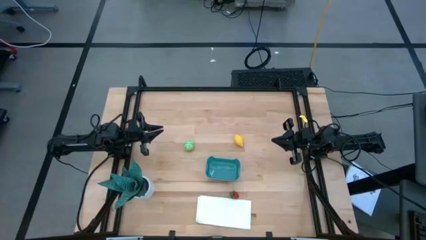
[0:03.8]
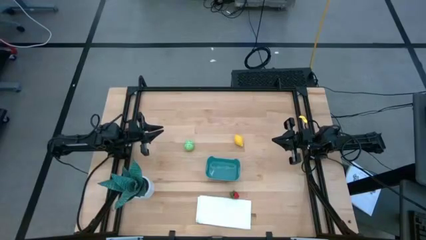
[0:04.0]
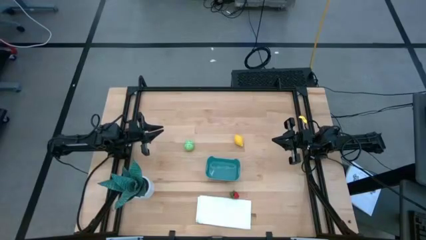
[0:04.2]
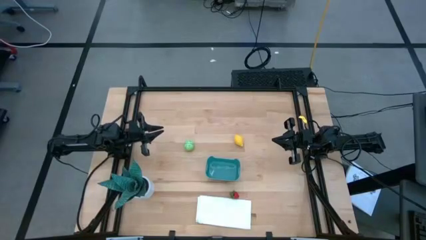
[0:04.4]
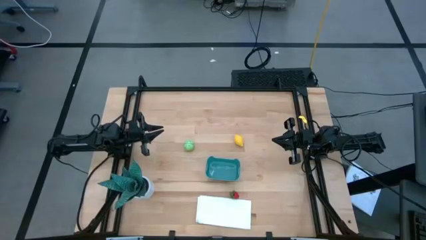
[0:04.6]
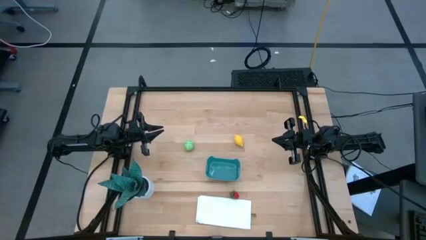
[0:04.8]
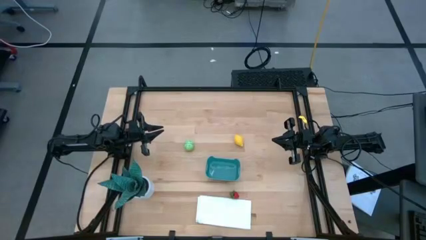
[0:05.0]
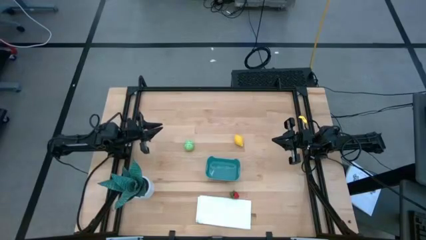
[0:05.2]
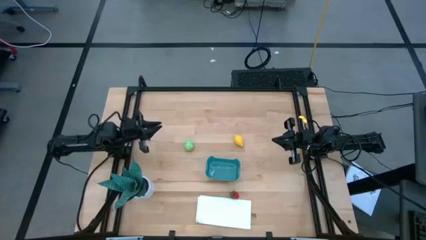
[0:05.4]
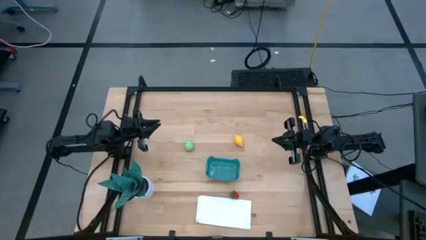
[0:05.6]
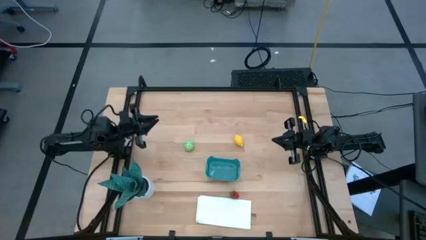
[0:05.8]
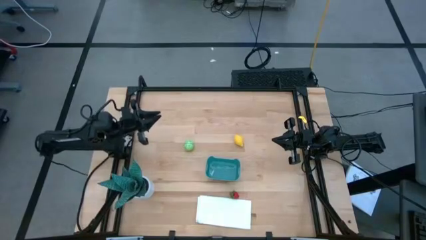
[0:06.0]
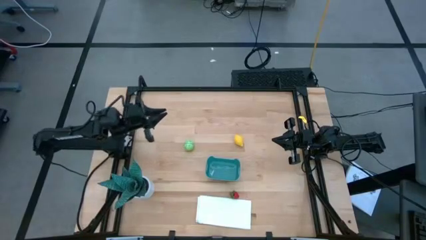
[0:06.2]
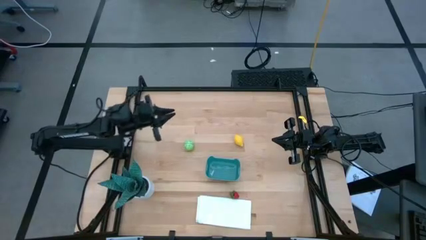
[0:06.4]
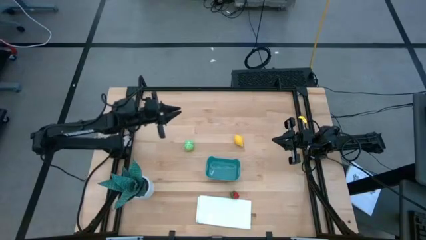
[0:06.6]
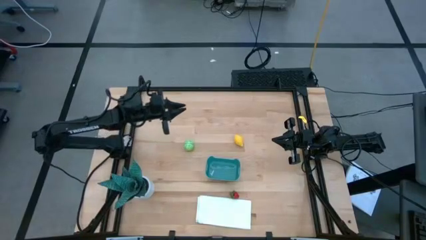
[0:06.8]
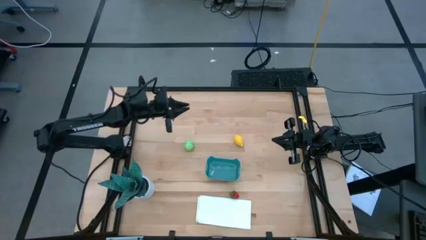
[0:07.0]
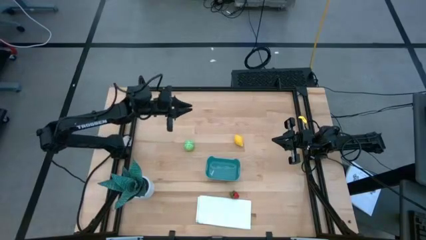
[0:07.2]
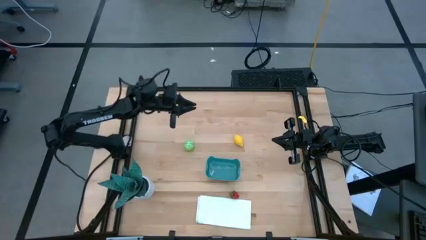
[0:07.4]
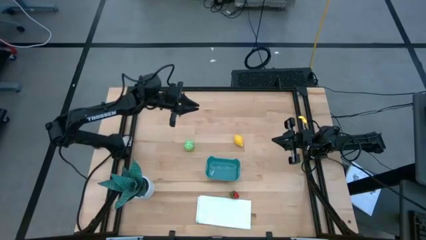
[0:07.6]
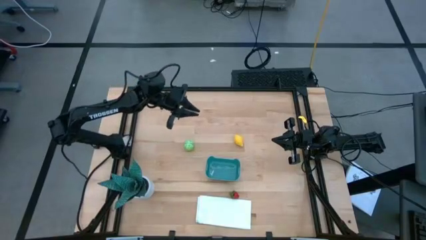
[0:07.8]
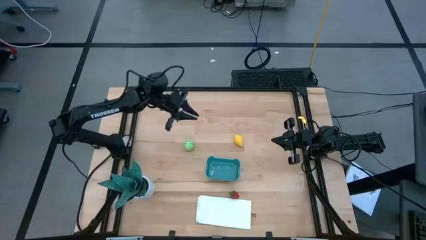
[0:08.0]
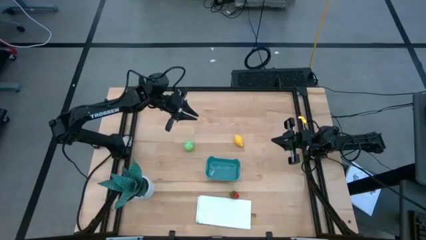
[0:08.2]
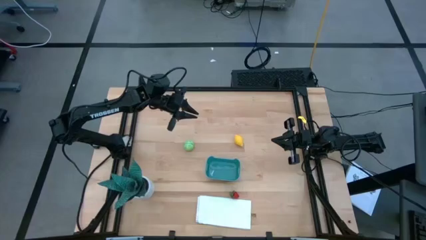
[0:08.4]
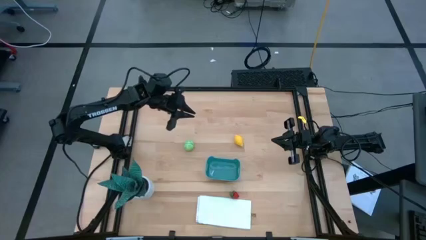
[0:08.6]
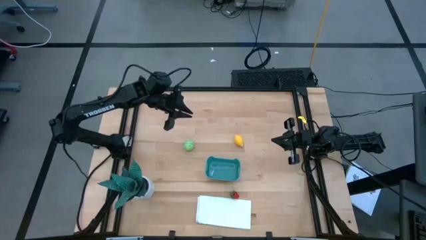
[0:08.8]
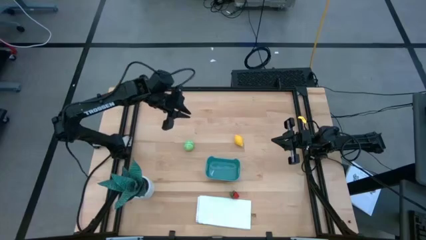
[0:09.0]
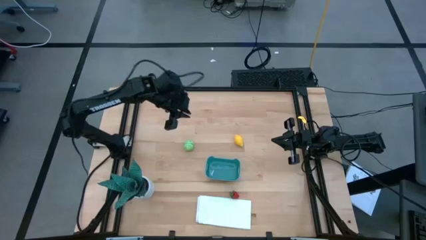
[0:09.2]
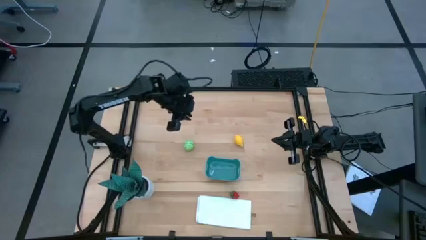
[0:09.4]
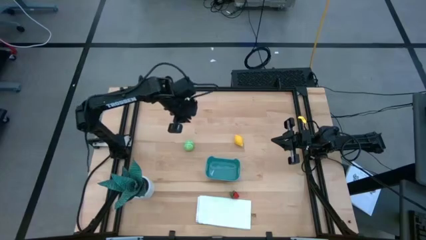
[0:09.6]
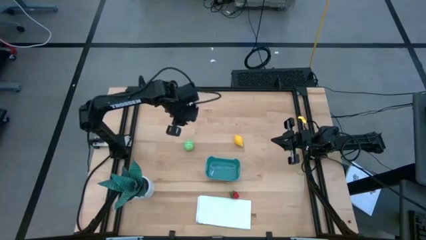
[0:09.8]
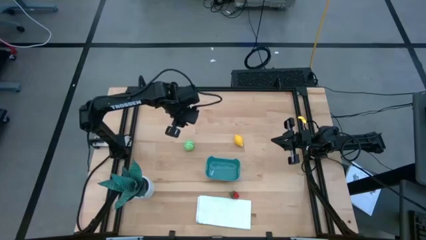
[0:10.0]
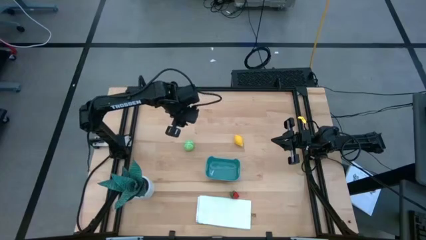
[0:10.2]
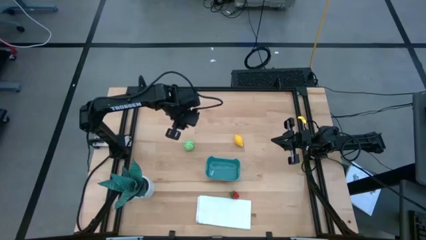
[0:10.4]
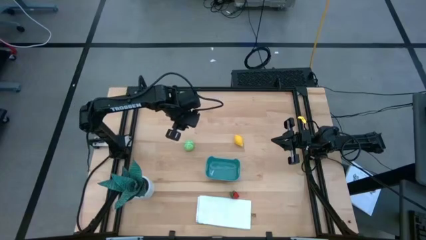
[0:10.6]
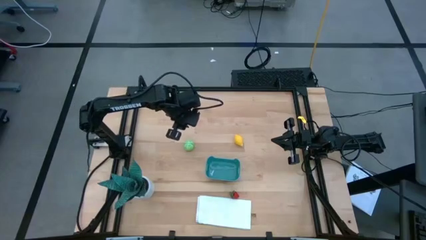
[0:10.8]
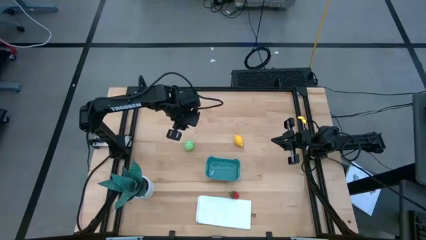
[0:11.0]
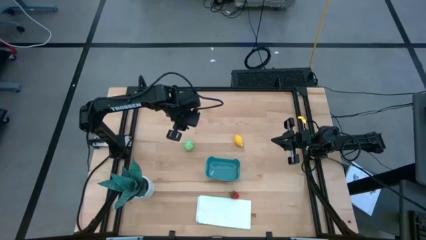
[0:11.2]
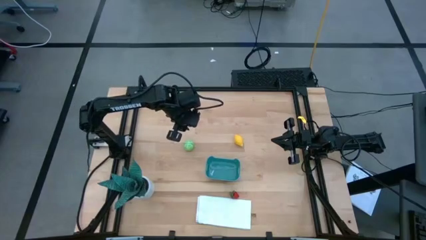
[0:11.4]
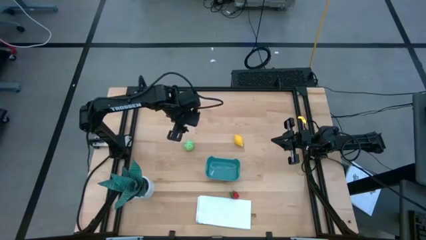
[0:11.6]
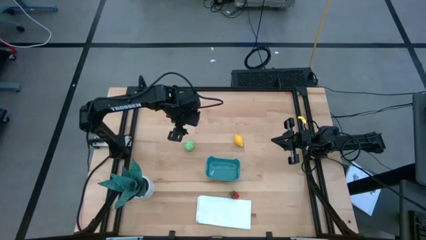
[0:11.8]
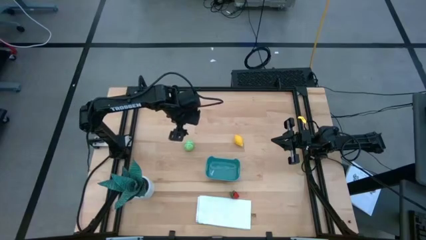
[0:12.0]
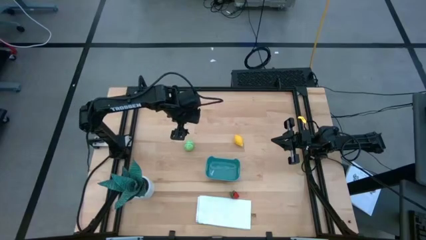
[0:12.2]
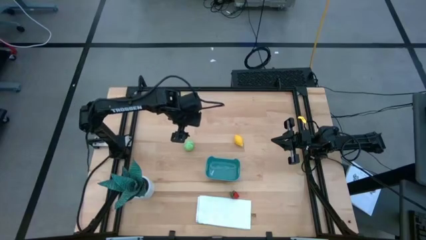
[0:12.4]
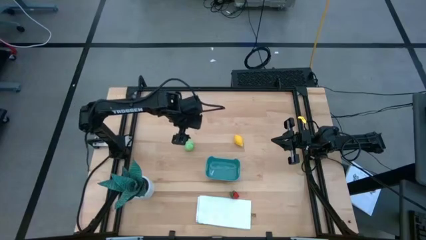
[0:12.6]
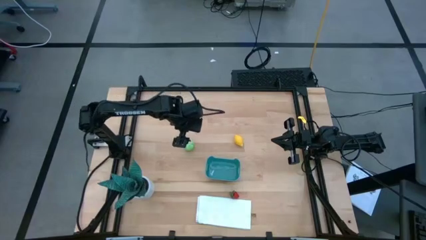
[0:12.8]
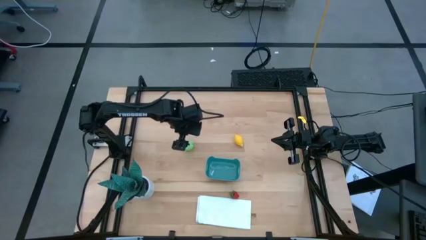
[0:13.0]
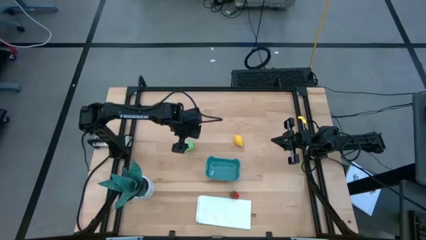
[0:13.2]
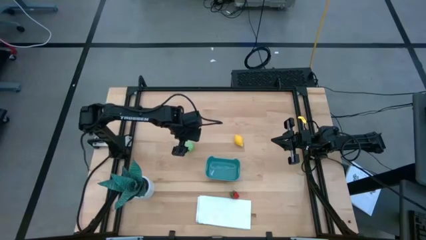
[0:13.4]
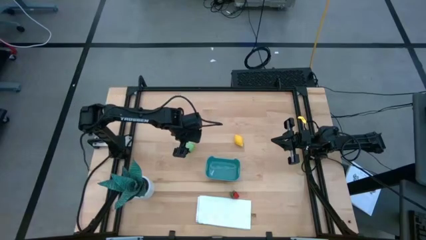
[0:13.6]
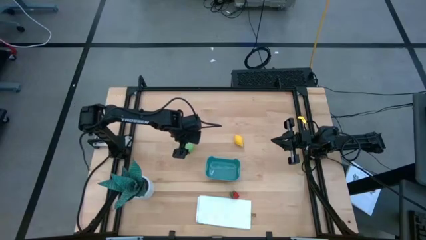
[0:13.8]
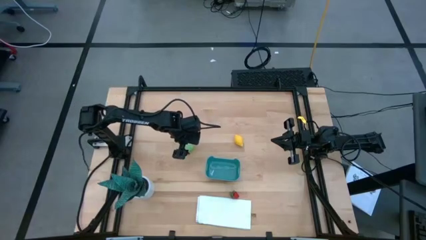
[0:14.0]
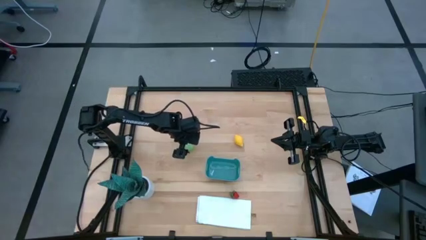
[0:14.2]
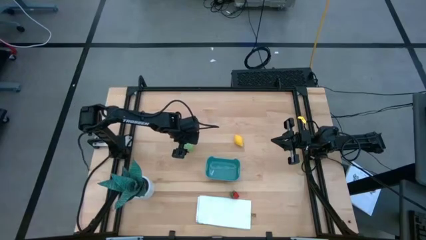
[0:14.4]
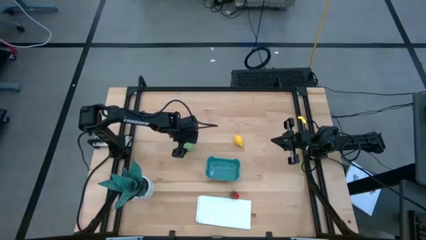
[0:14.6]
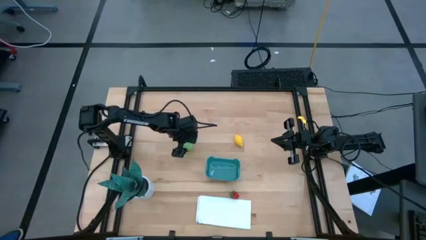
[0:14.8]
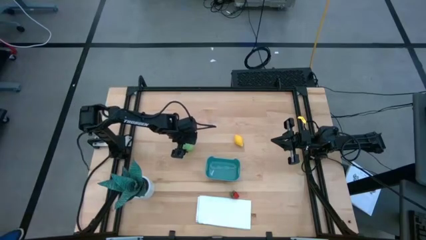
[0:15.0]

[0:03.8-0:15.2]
Task: Pick and placing Produce into tupperware
Put the cabbage into the green bin

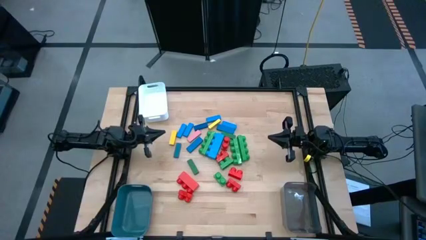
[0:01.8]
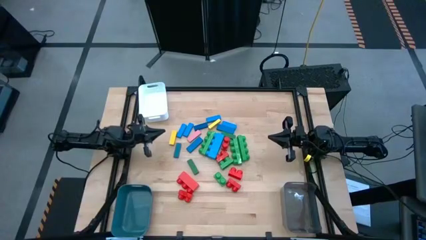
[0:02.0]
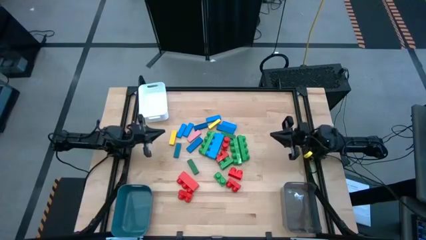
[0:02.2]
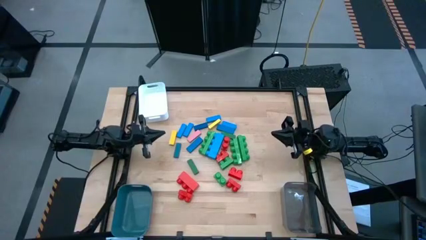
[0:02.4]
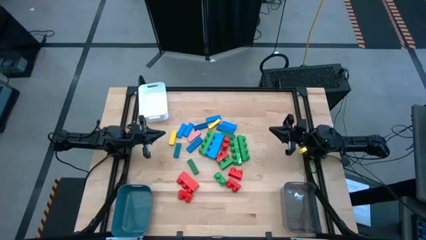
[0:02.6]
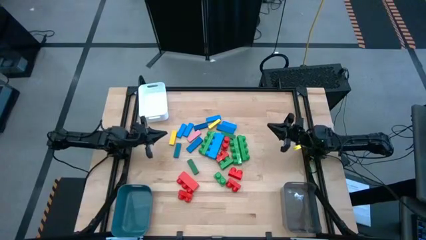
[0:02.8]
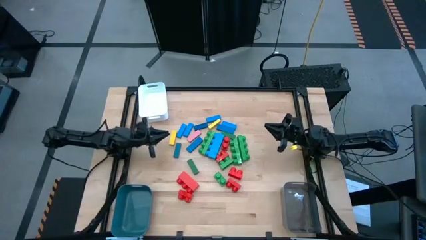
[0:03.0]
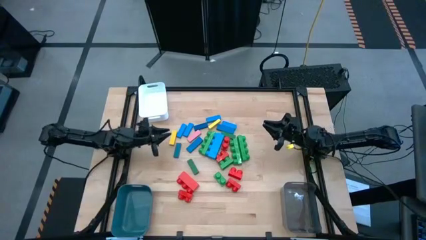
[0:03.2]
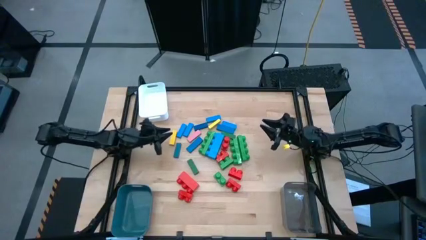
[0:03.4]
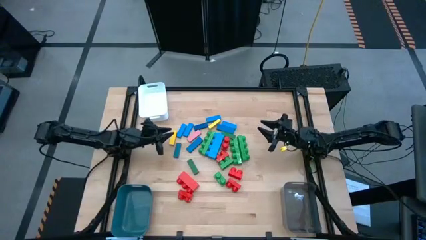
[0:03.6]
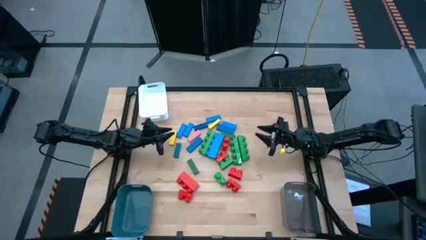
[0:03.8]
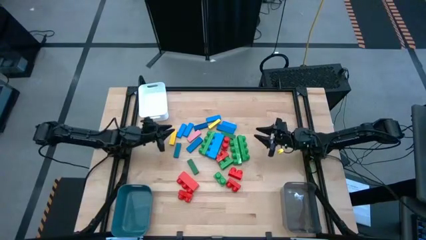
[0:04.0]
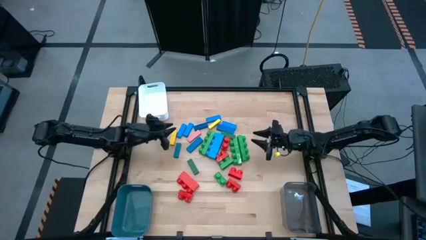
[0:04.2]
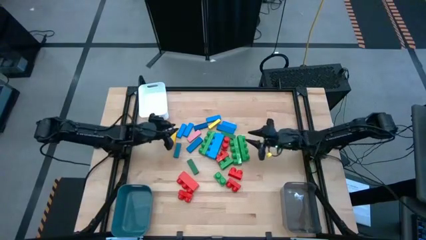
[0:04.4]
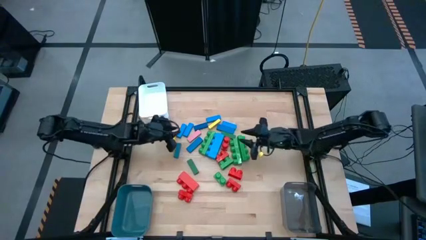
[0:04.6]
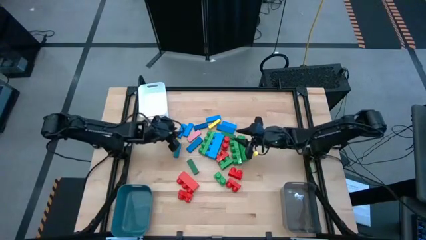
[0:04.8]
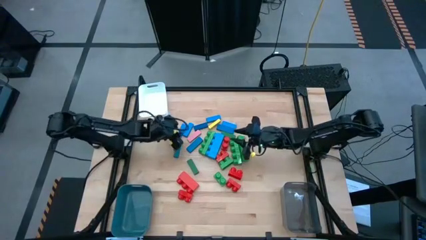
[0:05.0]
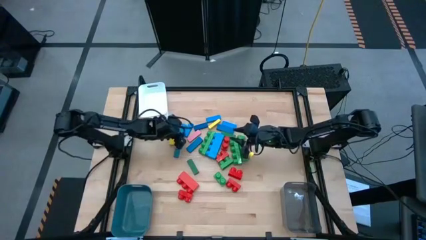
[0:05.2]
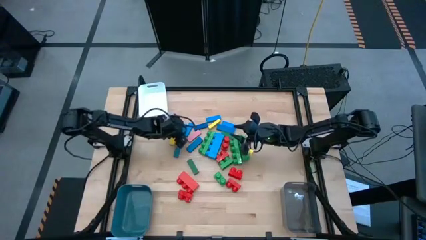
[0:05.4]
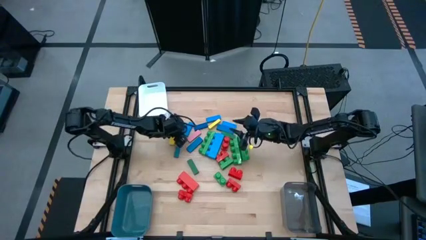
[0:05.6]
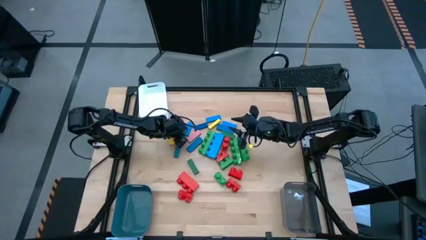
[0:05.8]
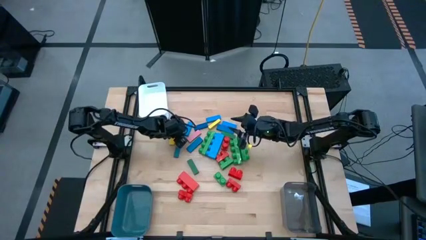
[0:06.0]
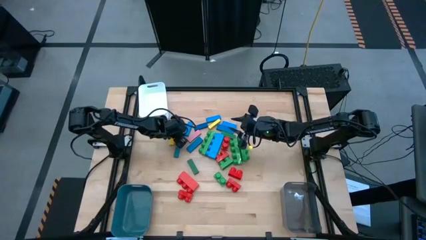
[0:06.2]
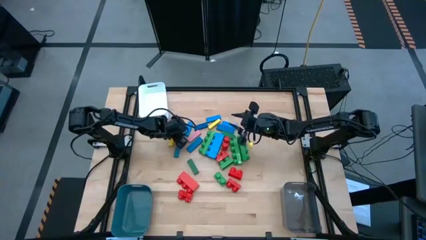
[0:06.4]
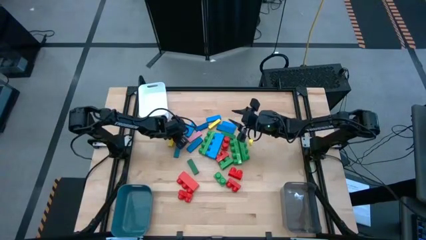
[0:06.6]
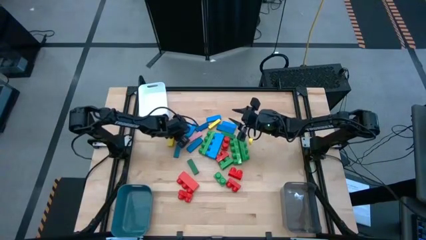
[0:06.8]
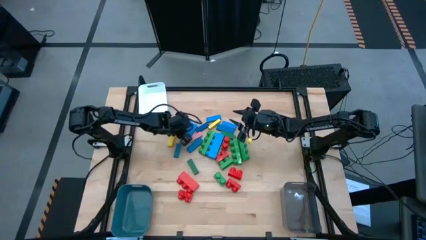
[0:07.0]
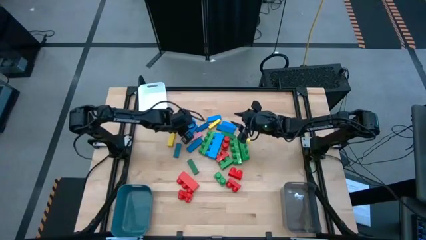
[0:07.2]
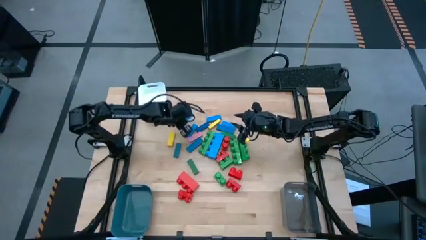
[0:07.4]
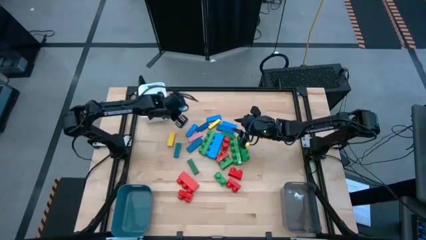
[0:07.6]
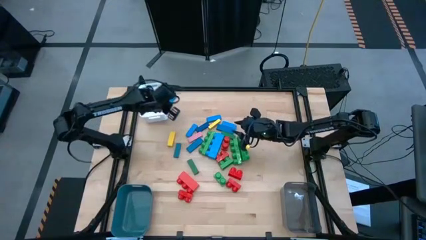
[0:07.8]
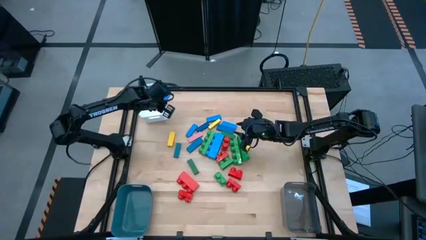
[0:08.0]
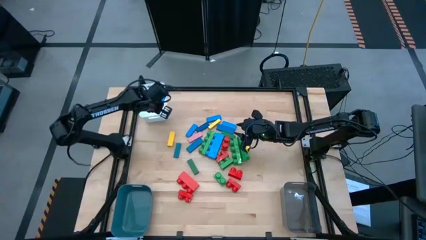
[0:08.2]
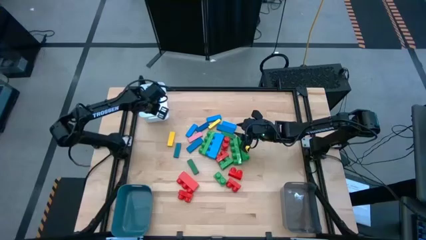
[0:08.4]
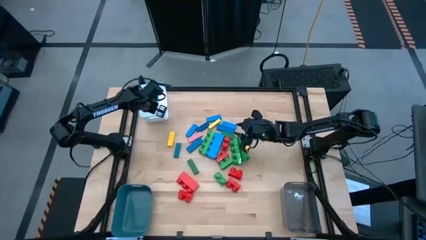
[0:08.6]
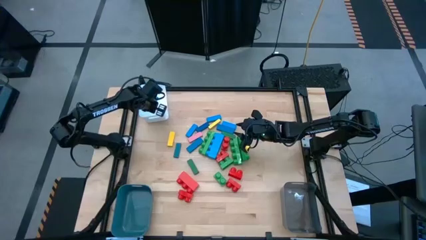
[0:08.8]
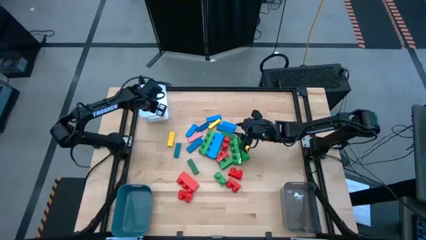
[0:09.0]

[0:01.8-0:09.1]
Task: Sort blocks by size
Put the blue block into the white bin
